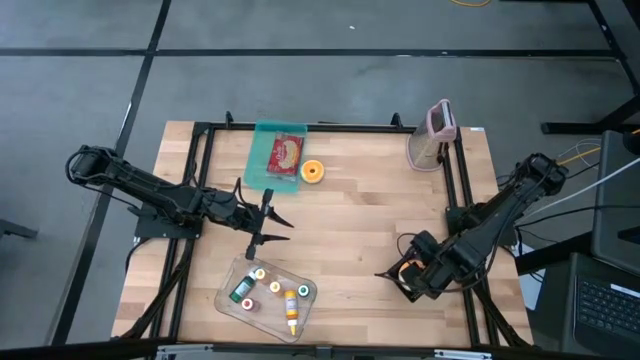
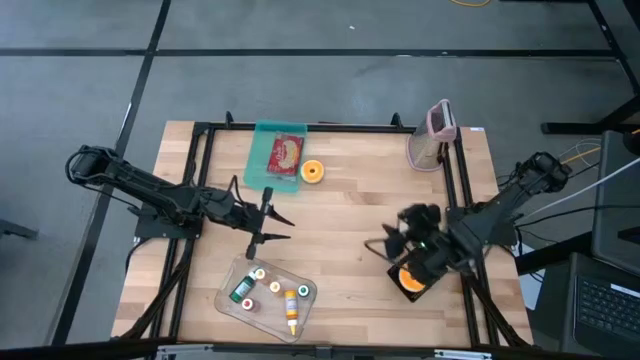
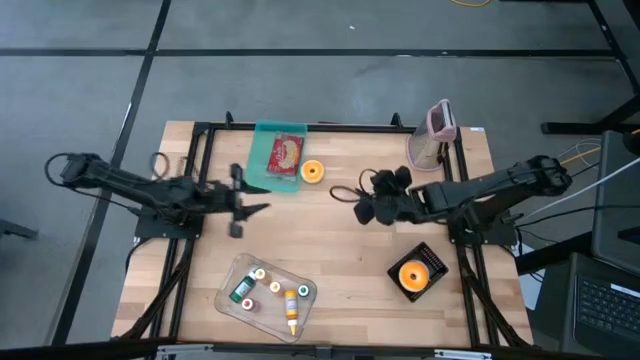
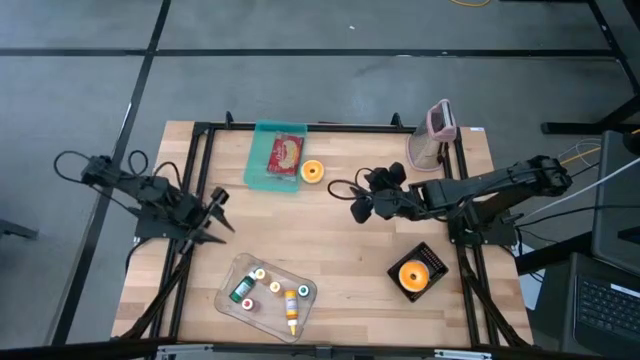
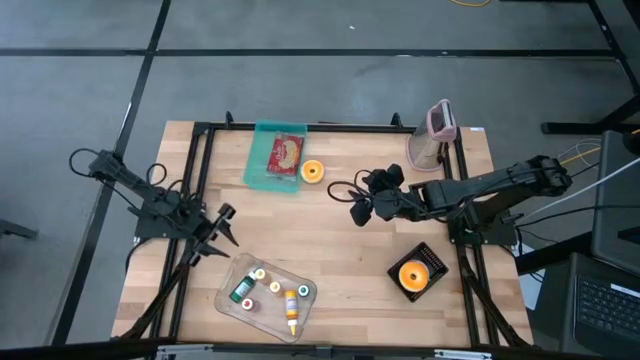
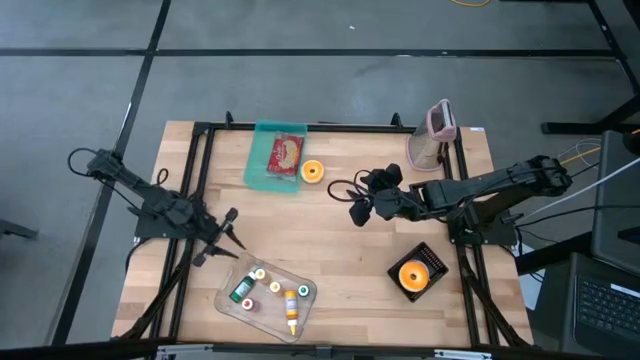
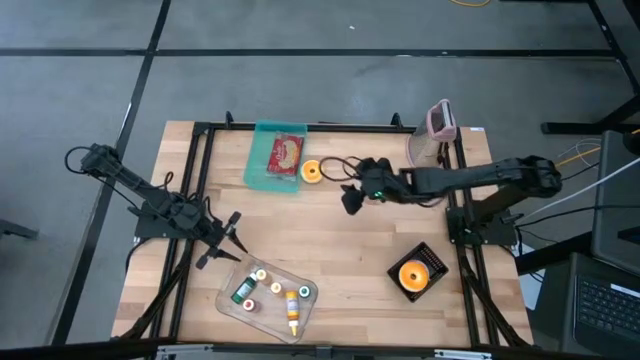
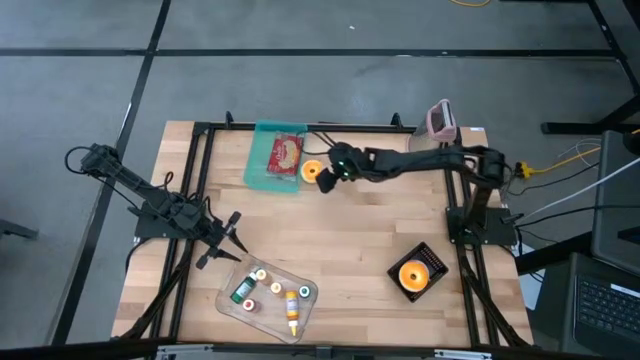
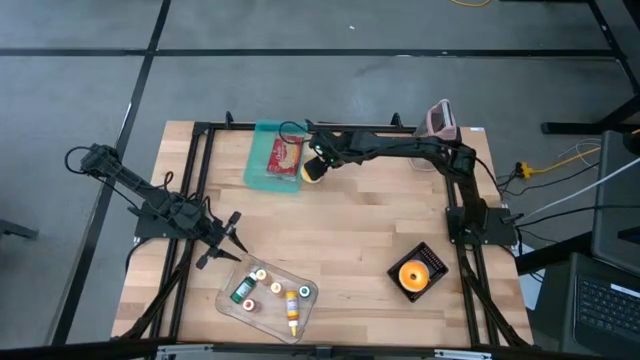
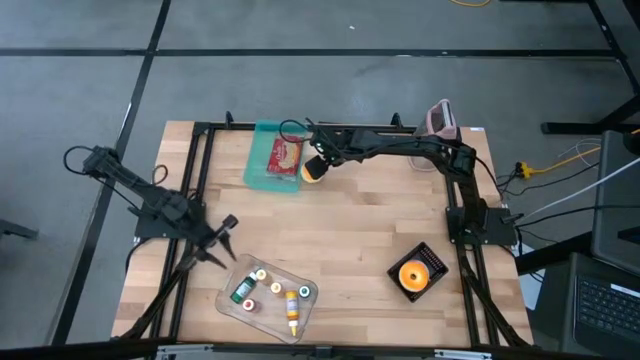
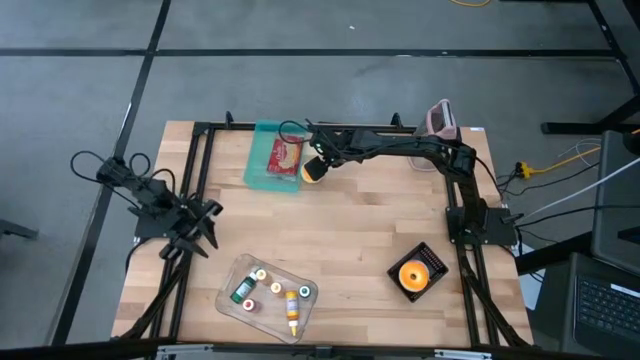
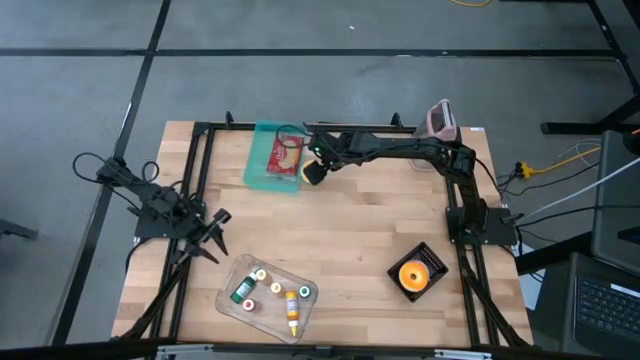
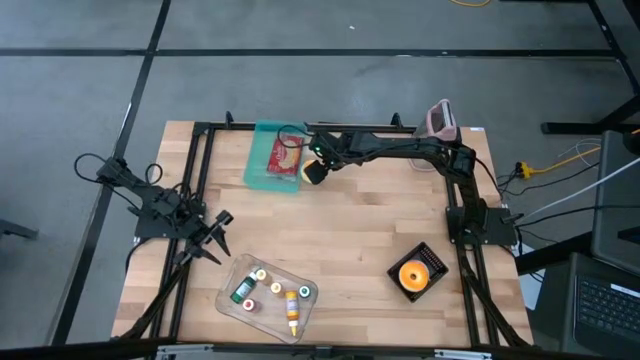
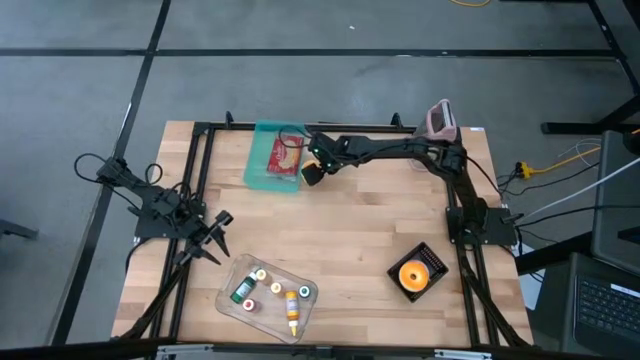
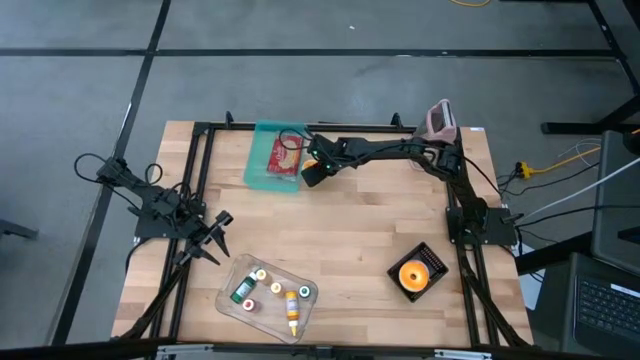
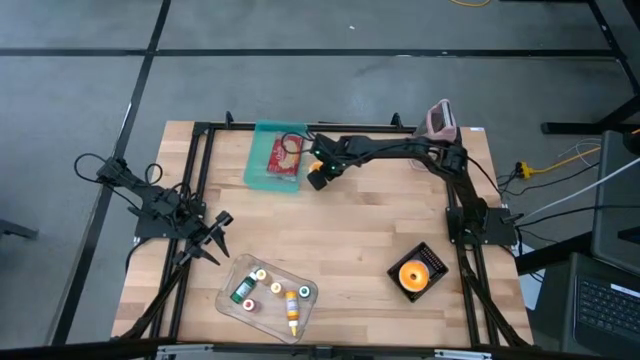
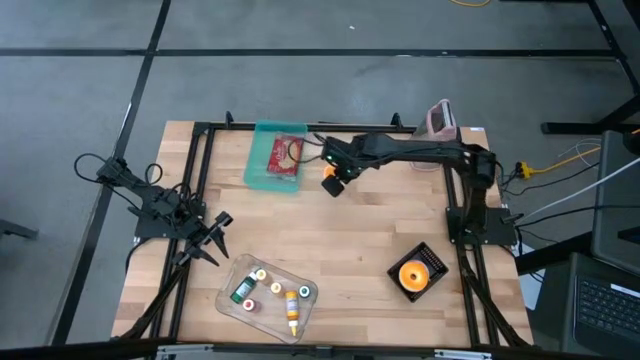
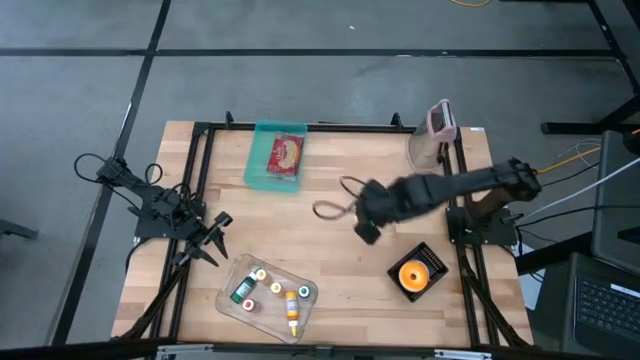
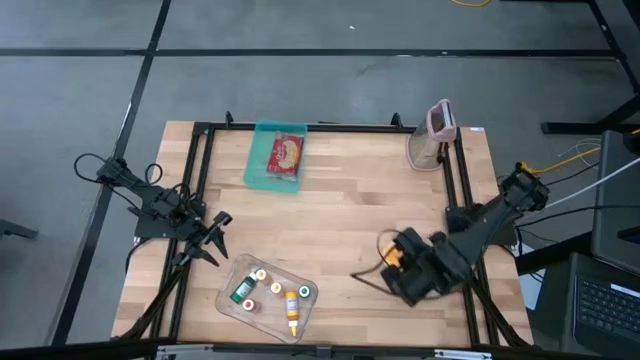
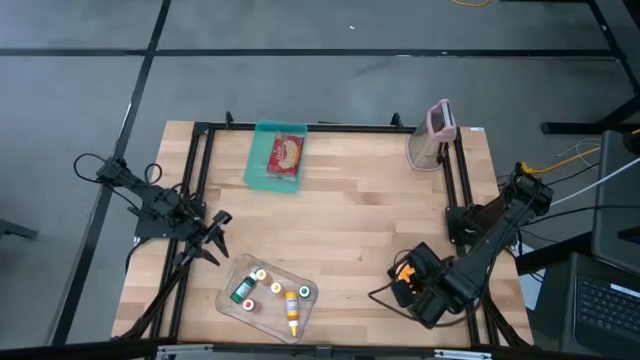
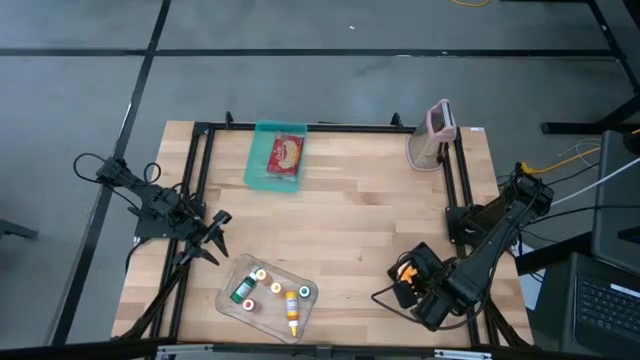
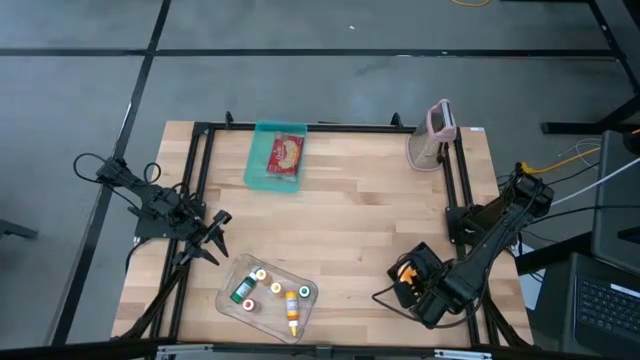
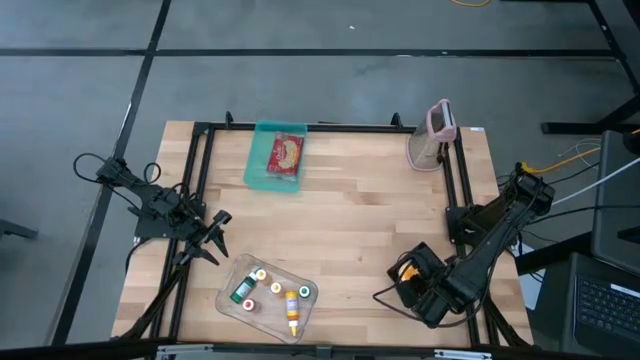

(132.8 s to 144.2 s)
Put the orange donut into the black basket

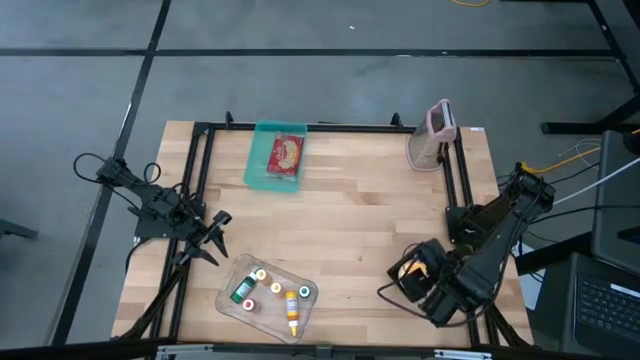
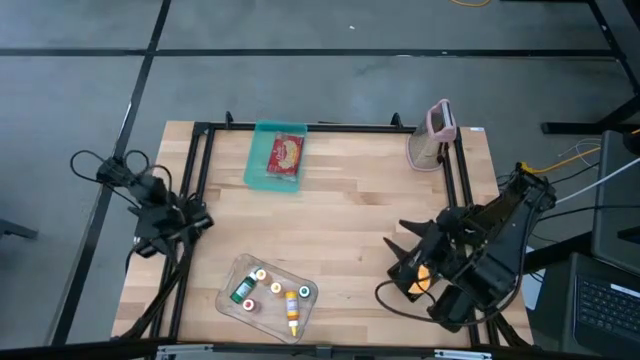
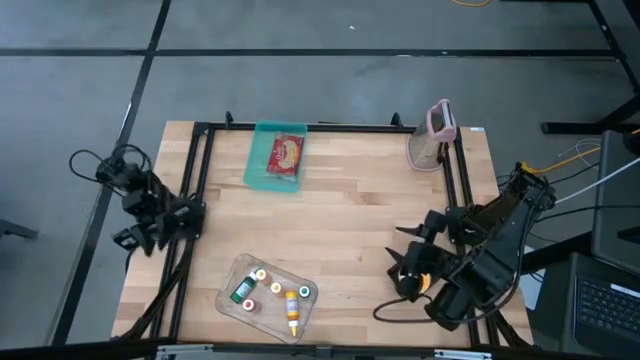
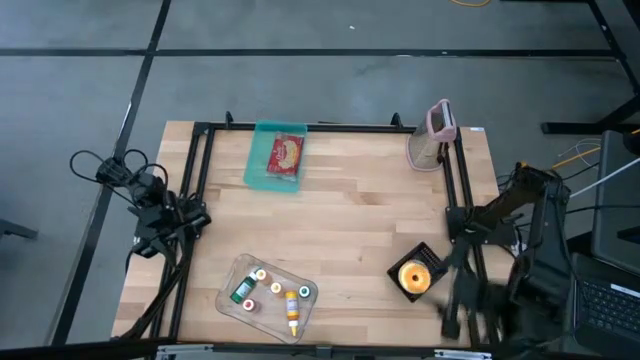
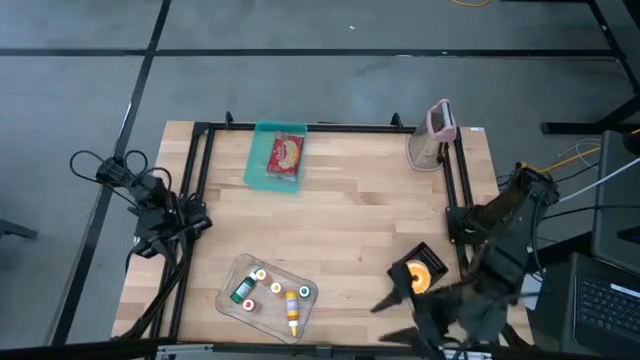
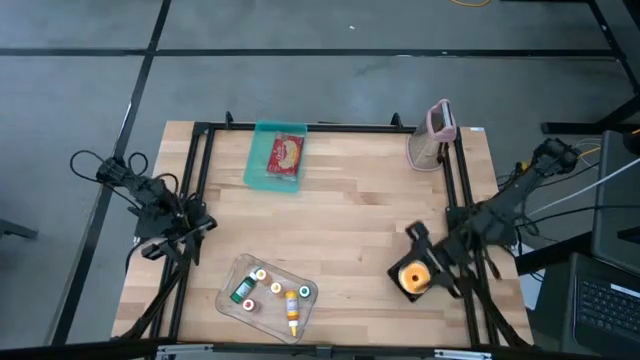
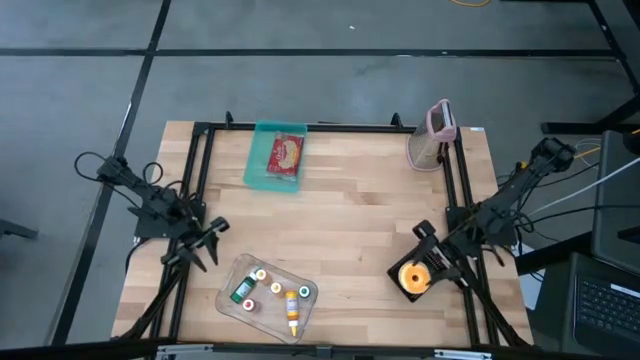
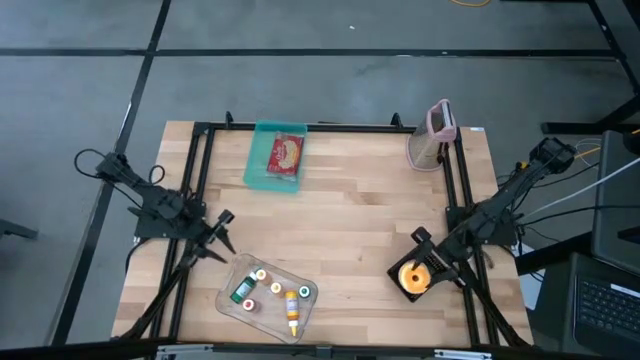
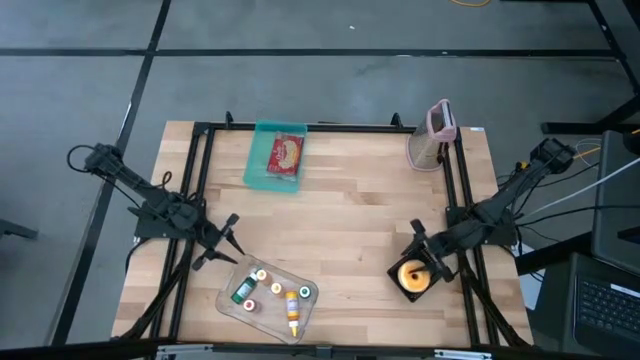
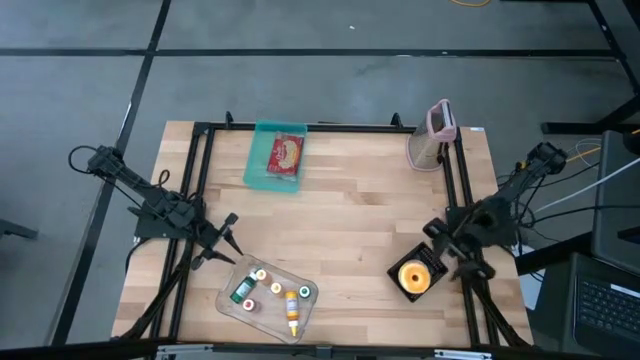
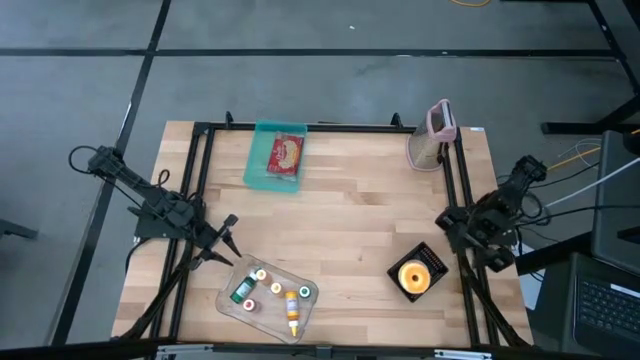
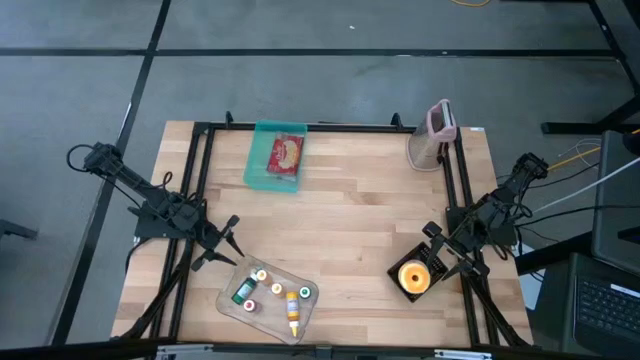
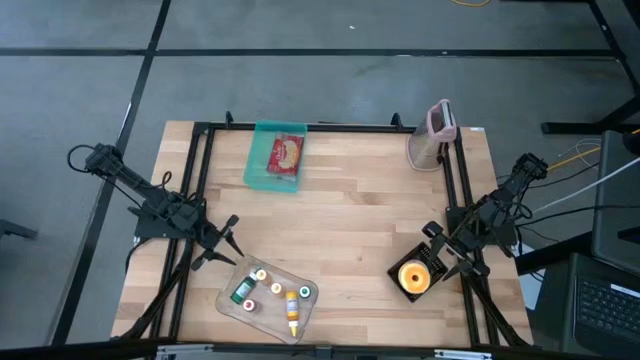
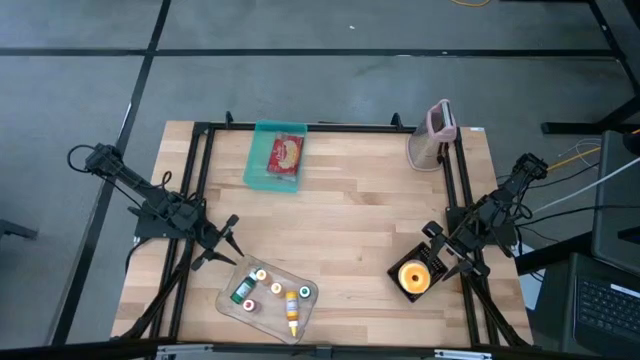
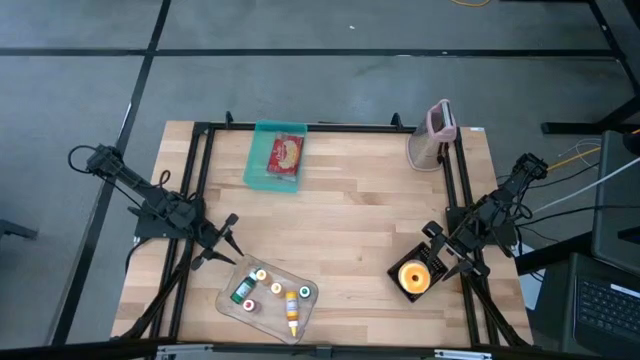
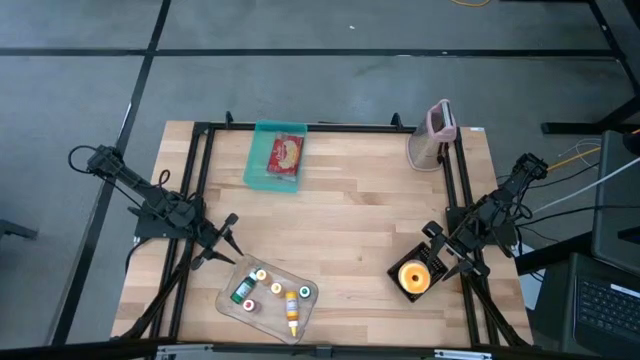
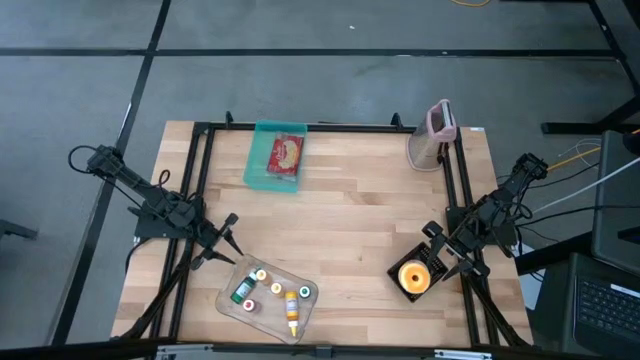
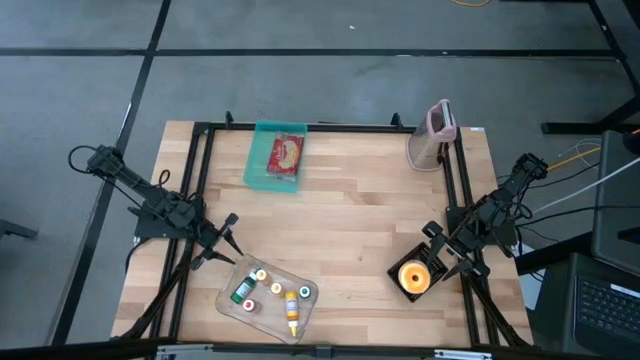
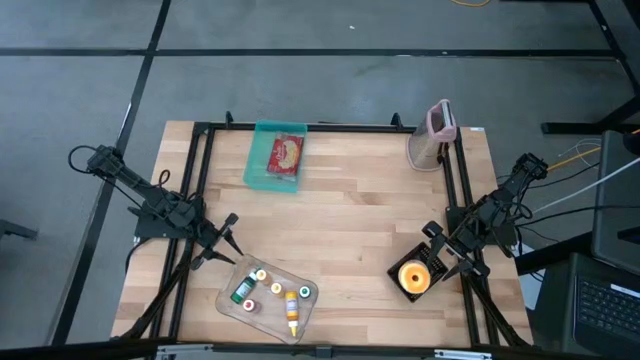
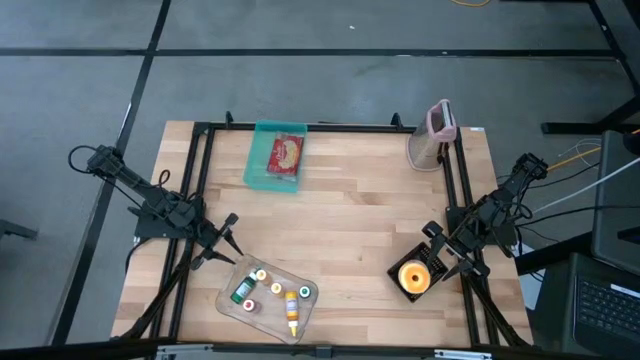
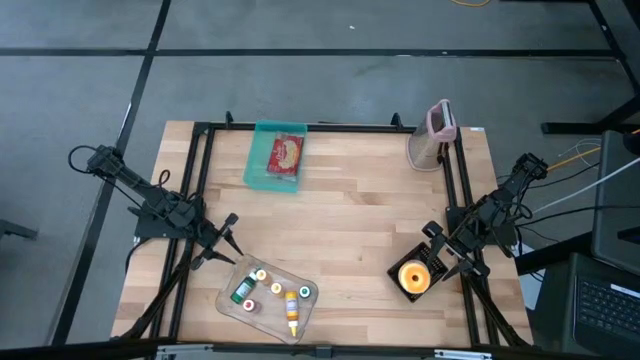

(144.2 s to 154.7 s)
Return to Home Position
